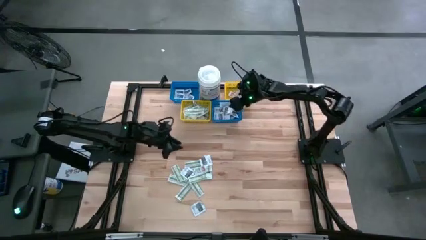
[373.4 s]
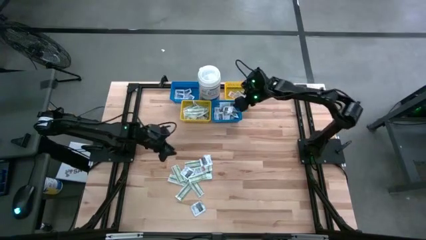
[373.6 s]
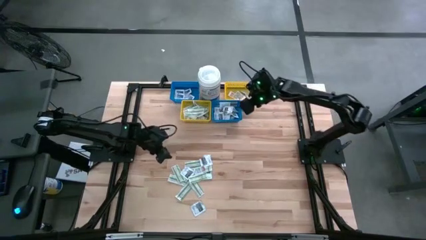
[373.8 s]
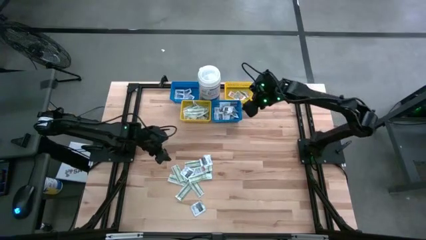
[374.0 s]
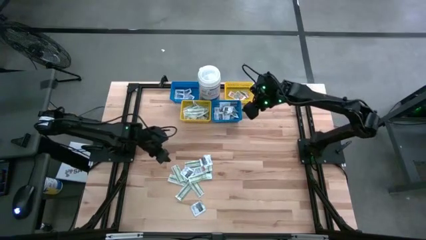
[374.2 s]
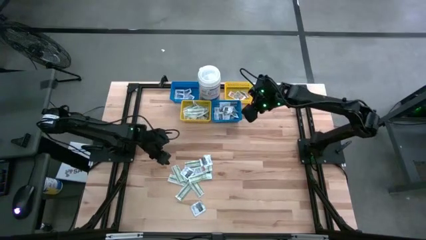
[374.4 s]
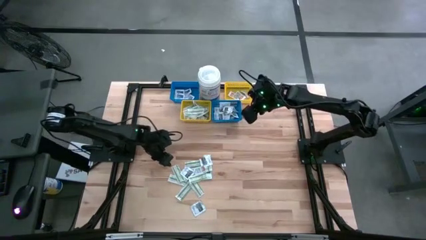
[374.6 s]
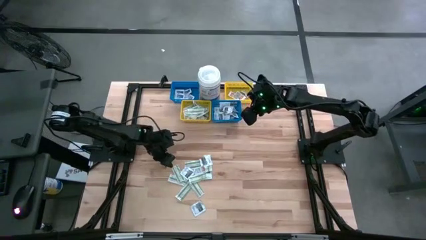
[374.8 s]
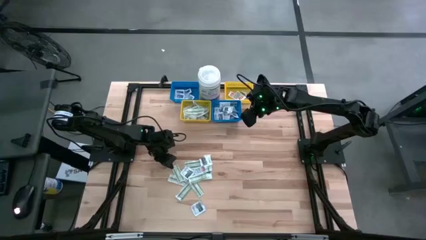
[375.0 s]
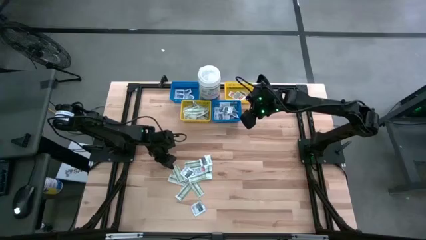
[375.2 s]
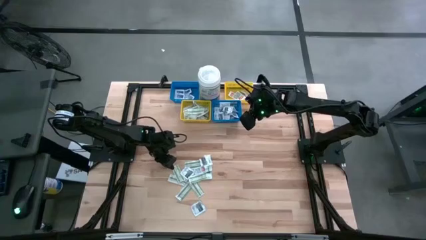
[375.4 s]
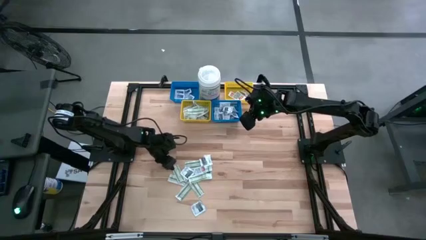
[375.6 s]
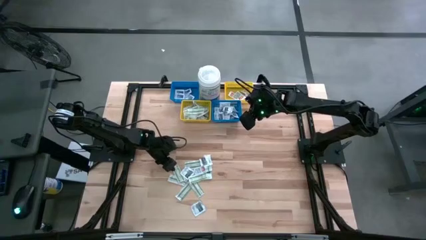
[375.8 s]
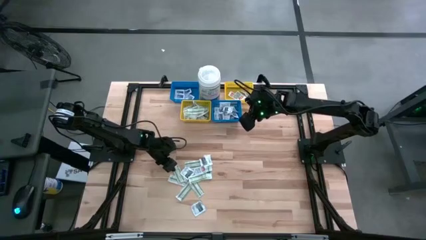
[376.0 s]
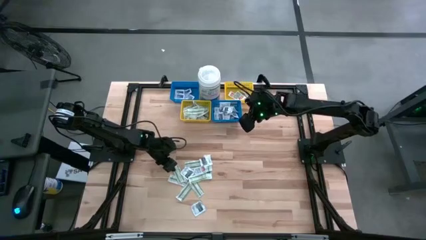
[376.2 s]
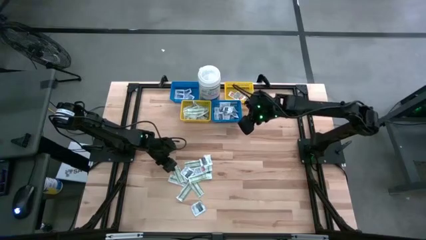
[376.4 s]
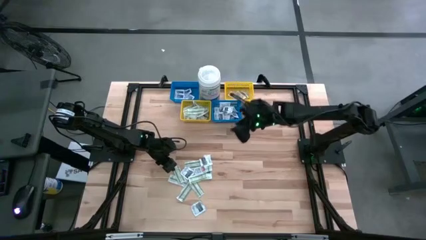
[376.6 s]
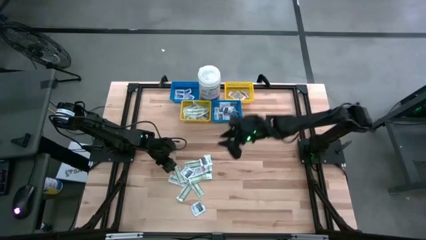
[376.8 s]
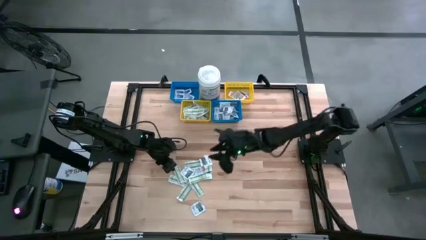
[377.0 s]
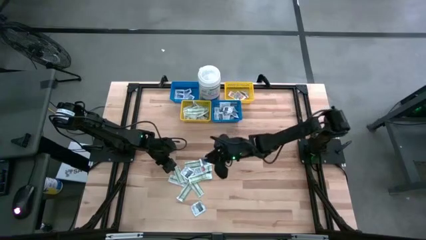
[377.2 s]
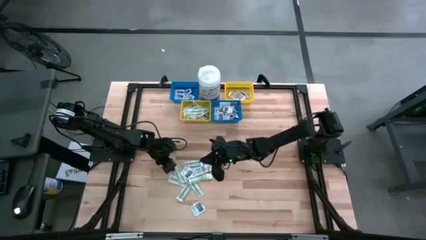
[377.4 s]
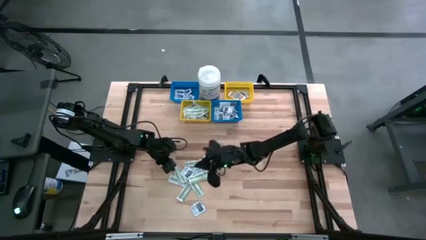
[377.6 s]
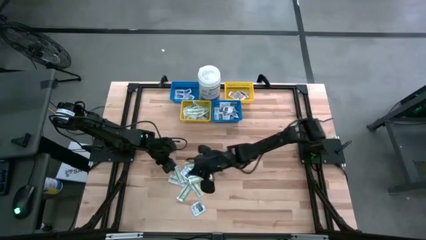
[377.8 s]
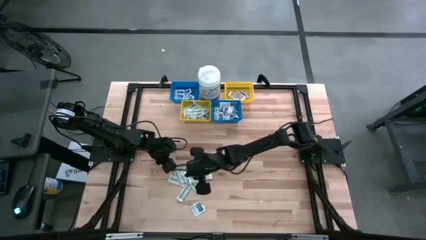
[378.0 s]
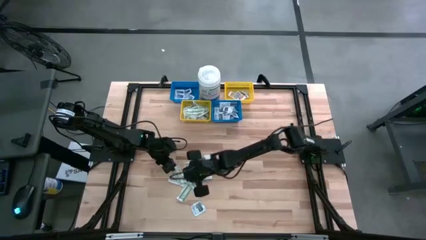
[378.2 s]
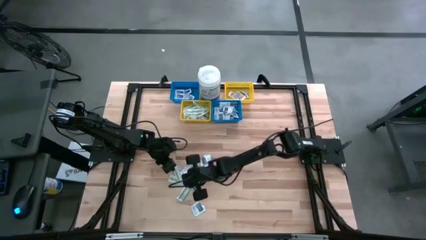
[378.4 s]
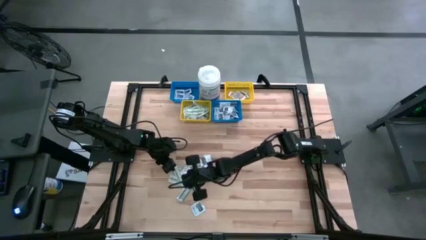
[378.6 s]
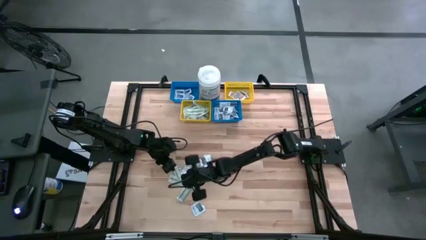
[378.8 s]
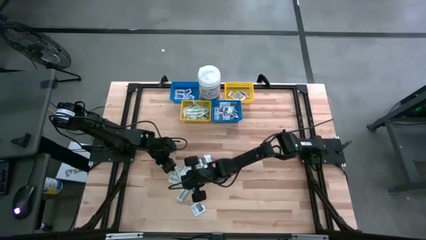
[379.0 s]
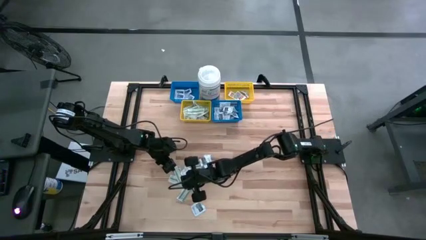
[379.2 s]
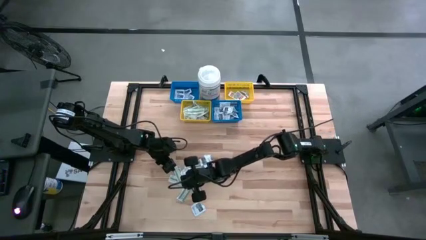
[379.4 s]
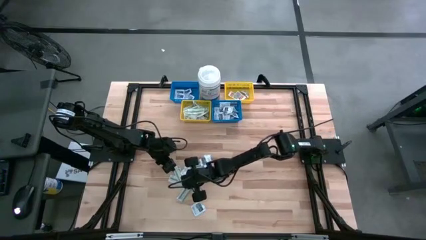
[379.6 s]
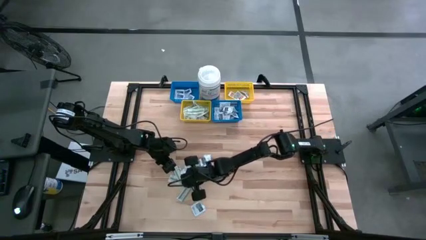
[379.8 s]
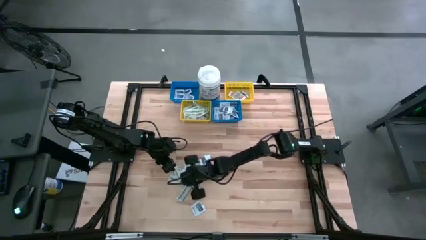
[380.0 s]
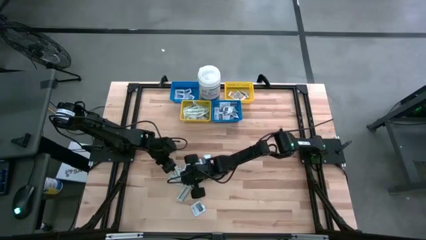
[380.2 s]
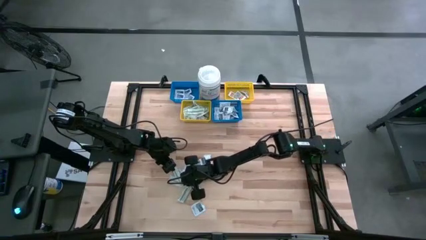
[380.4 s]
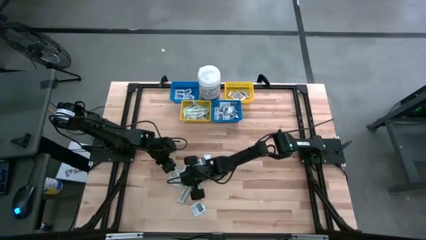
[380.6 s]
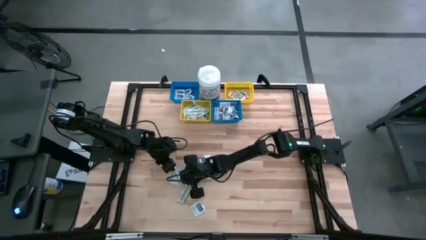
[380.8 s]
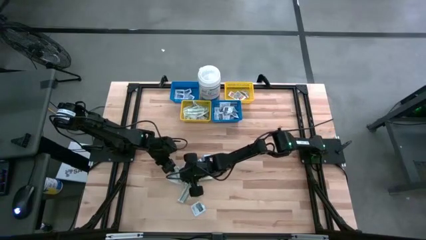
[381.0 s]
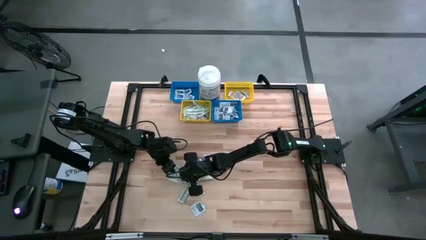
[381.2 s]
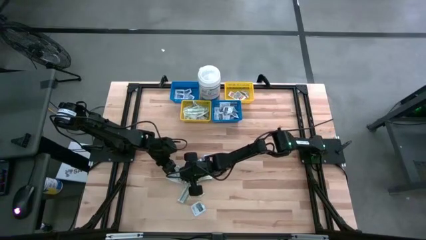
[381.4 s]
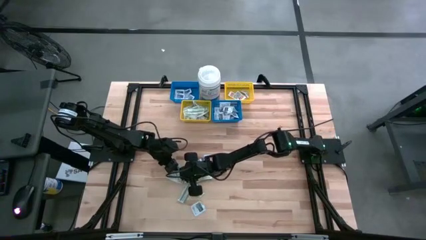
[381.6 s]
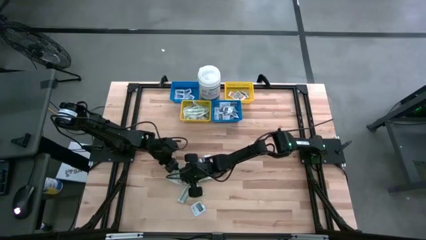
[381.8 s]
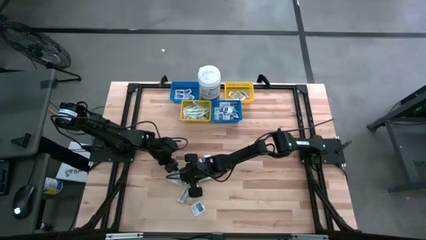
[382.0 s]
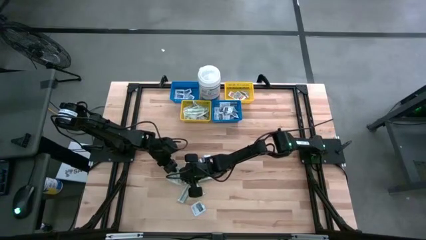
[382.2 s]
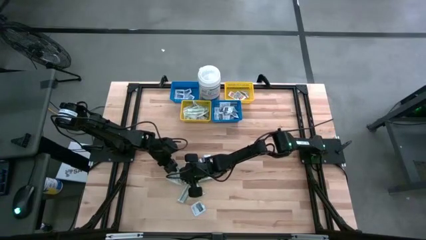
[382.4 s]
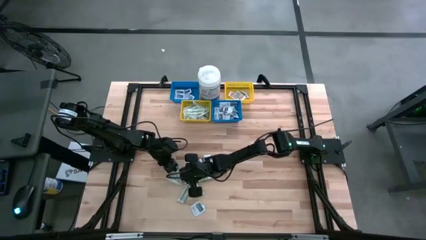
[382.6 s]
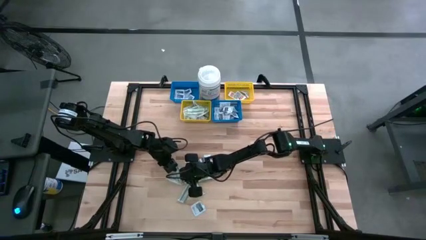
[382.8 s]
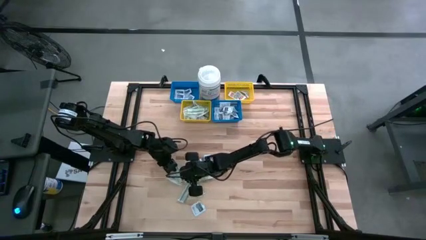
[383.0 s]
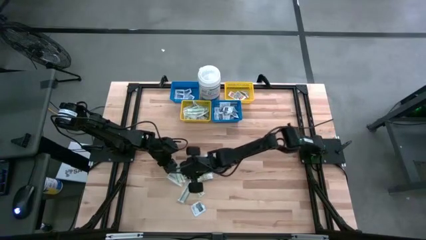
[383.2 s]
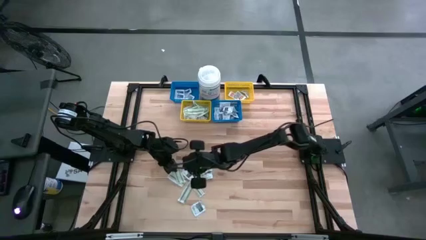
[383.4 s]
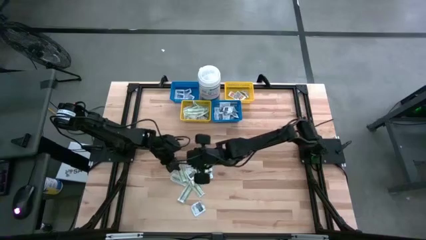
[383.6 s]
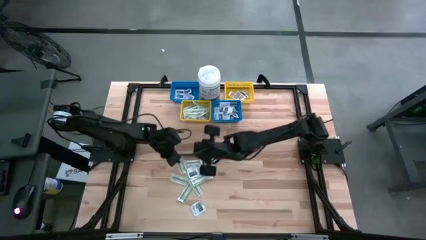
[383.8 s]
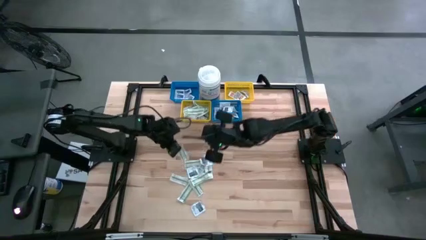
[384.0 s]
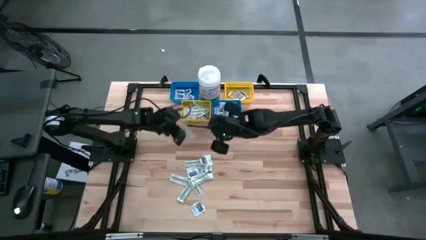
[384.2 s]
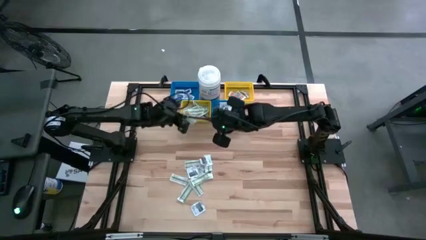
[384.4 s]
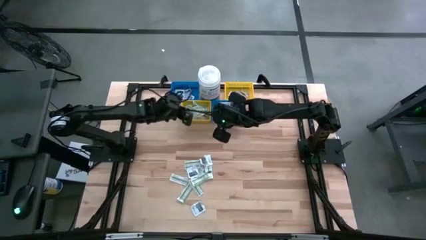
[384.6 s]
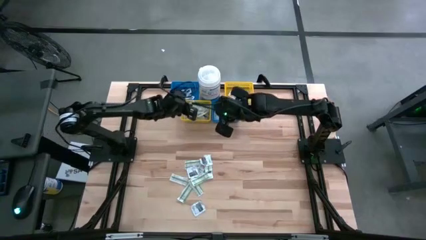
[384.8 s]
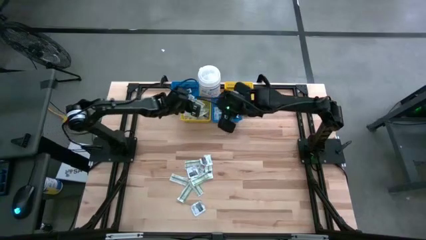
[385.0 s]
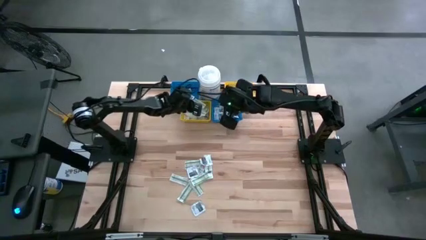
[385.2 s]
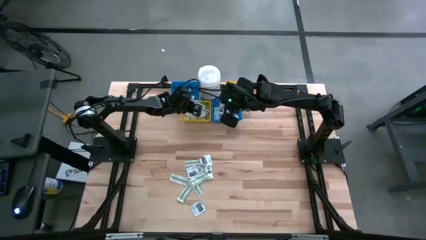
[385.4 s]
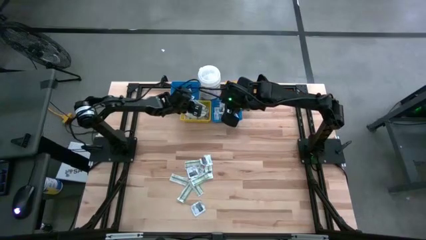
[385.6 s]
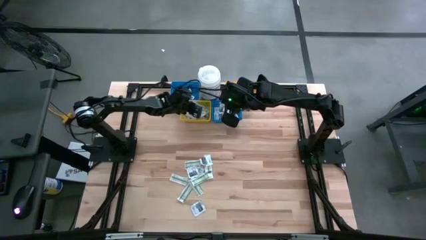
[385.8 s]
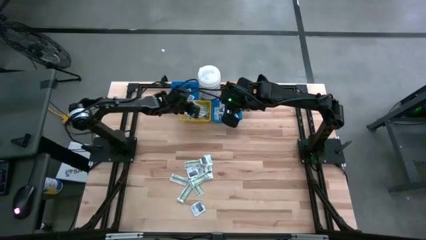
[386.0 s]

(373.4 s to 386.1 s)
Task: Pick & Place First Aid Supplies
Put the green bandage pad into the left yellow bin

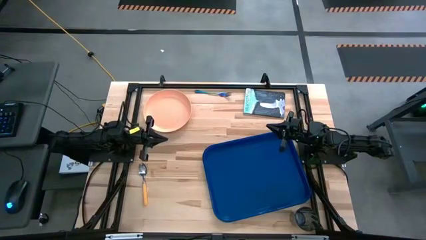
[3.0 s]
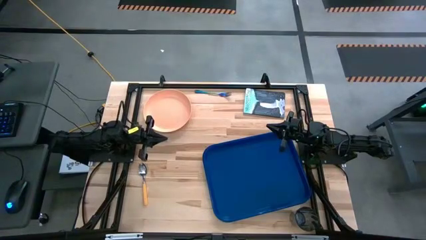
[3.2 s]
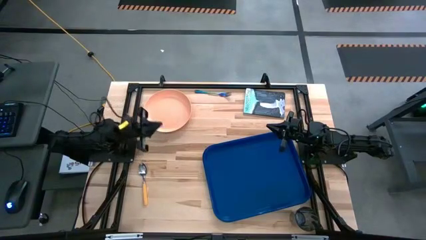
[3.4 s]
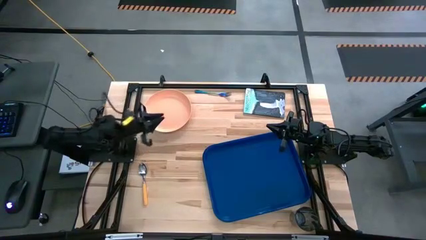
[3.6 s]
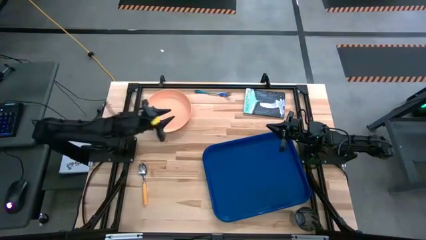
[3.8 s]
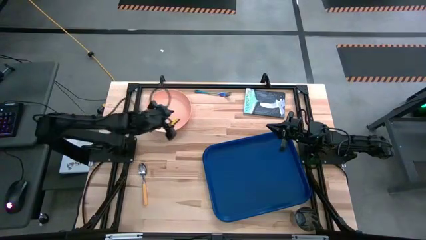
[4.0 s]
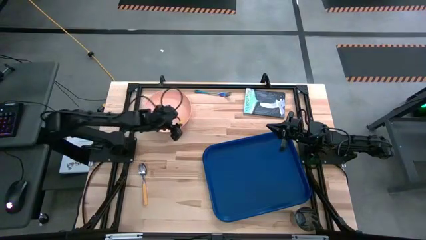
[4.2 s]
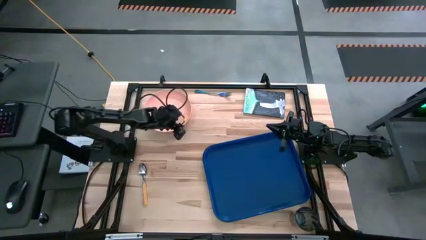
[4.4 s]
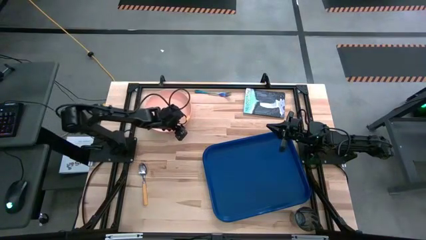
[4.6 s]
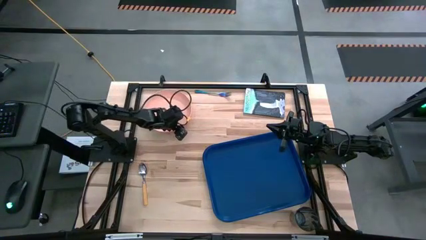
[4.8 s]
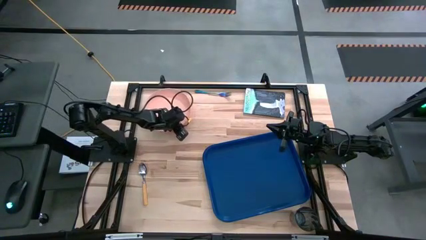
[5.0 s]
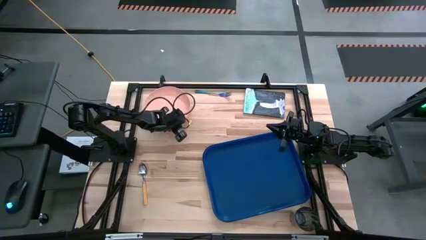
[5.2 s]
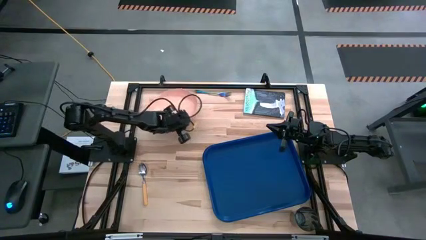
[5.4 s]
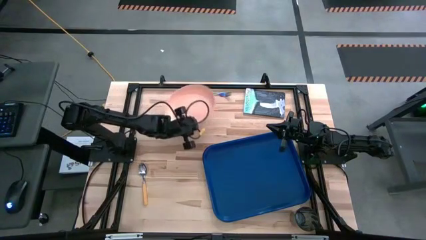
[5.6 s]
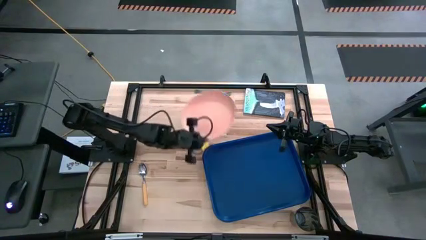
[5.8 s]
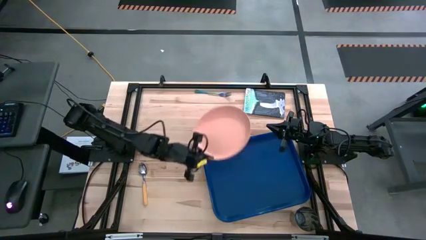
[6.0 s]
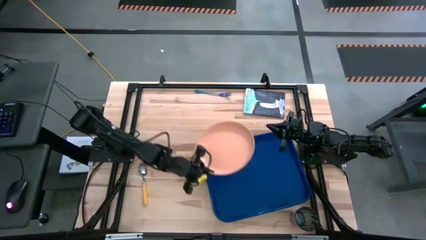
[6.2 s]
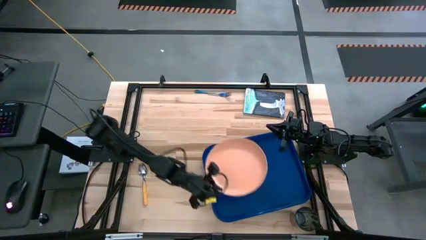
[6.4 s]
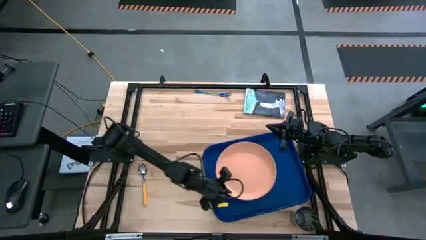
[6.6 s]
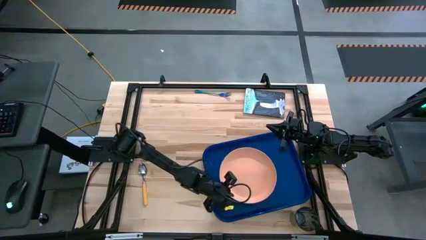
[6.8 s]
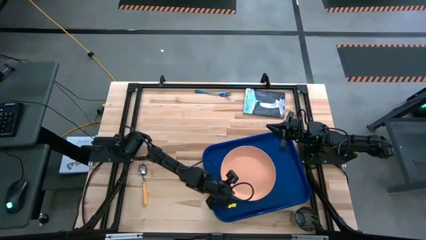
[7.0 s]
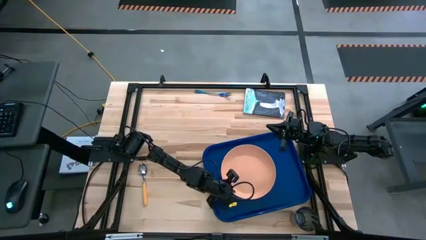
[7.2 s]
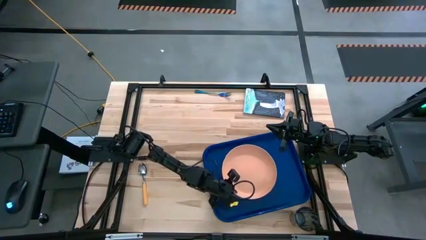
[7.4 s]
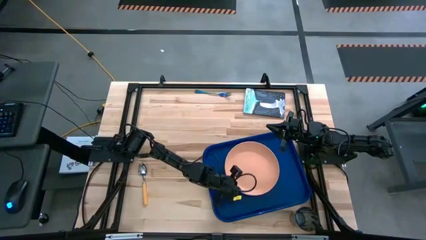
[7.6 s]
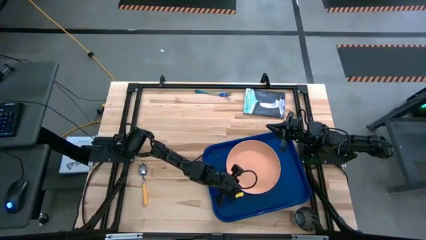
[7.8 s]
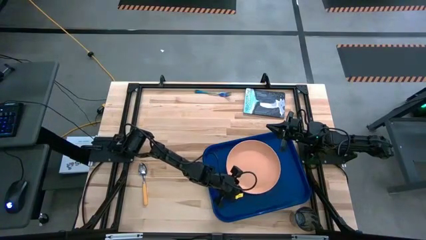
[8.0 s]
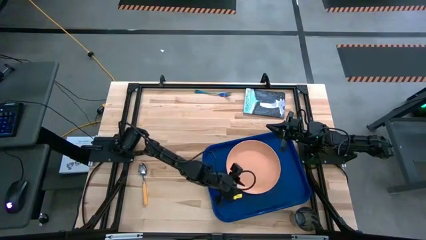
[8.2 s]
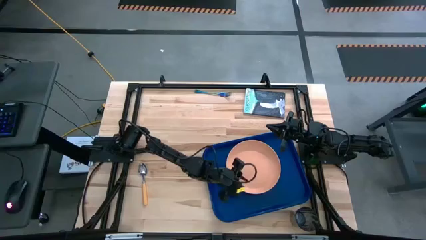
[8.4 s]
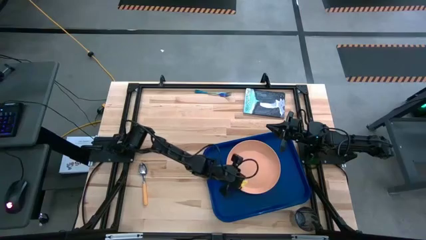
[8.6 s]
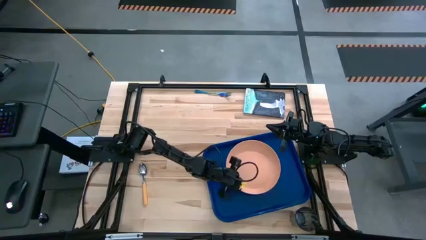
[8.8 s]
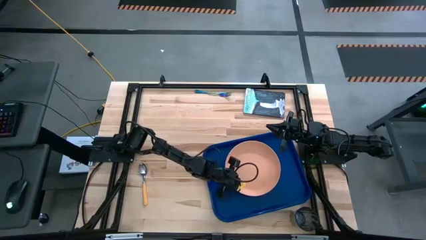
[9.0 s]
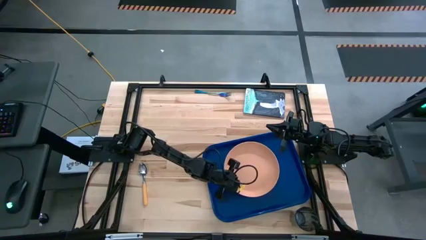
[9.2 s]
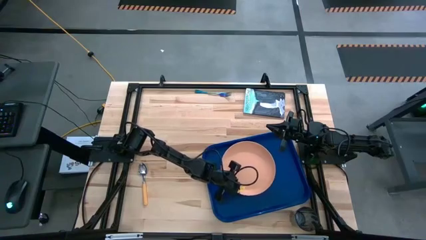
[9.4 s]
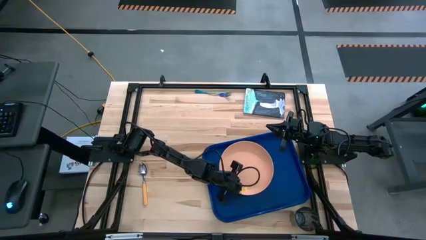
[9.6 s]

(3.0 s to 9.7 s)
Task: Pick and place plate/cup/fork/spoon on tray
Put the orange plate on the blue table tray
